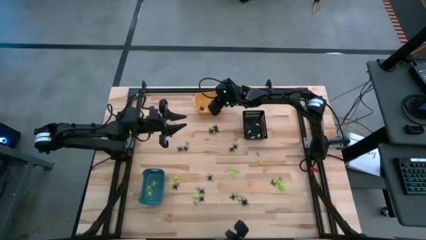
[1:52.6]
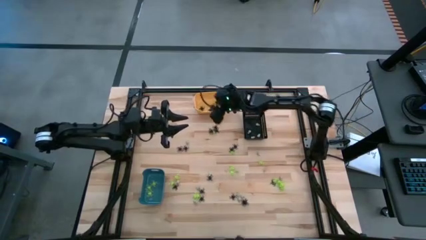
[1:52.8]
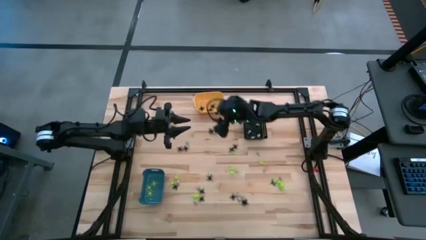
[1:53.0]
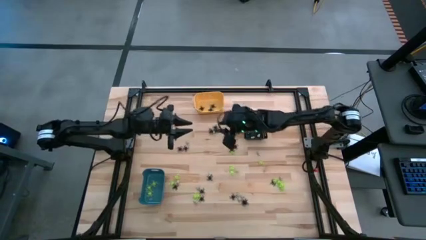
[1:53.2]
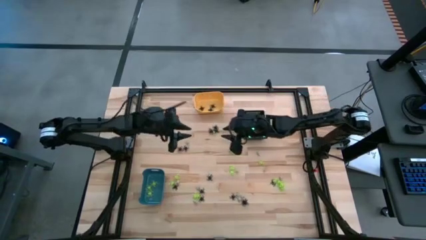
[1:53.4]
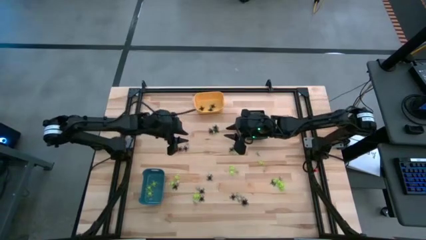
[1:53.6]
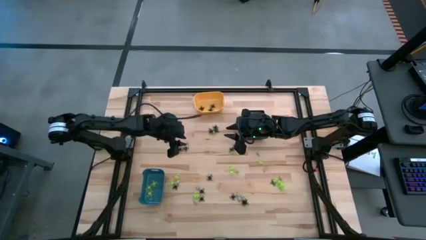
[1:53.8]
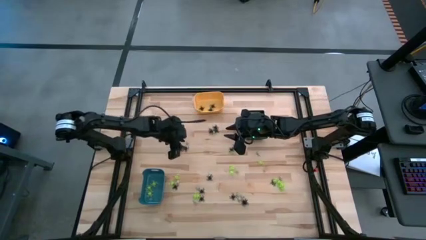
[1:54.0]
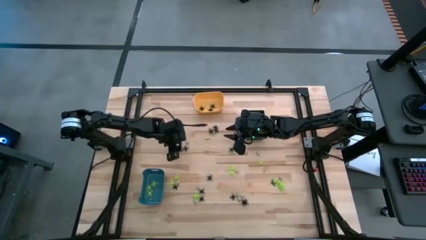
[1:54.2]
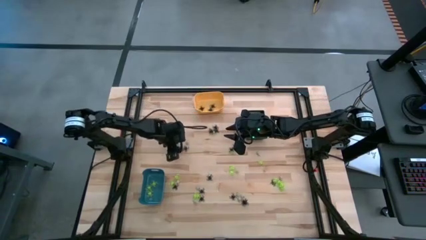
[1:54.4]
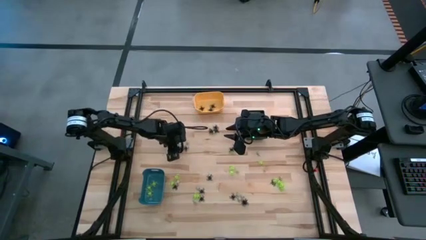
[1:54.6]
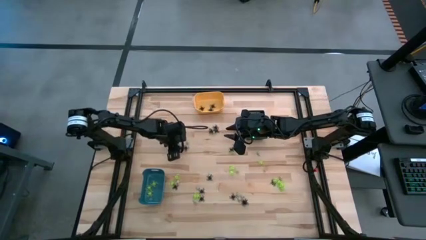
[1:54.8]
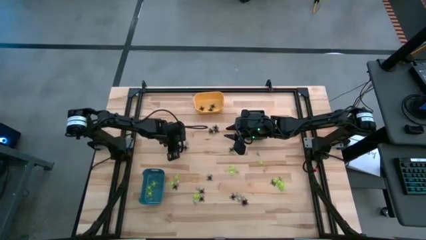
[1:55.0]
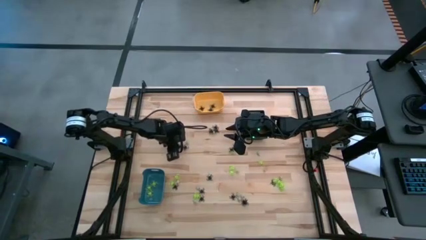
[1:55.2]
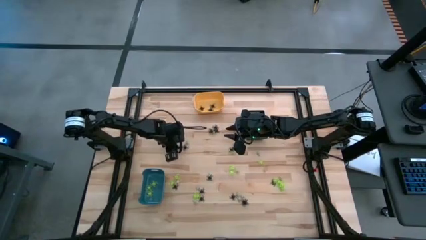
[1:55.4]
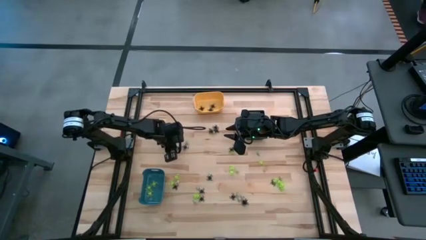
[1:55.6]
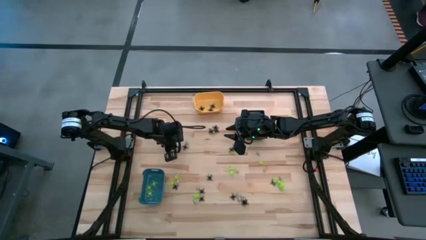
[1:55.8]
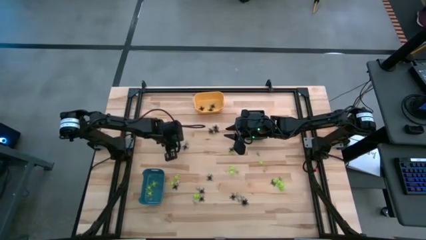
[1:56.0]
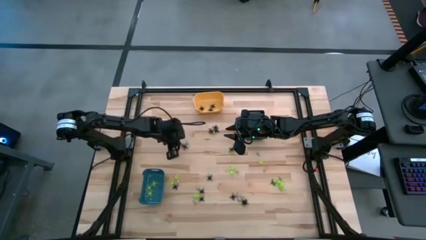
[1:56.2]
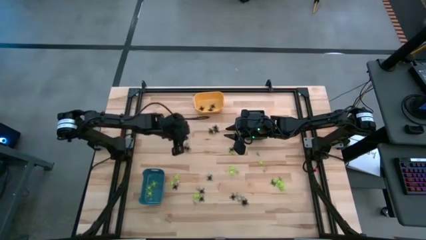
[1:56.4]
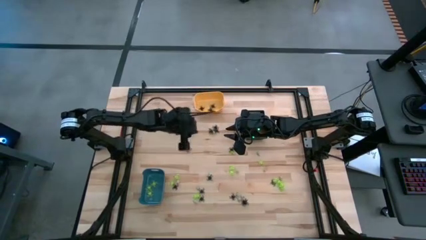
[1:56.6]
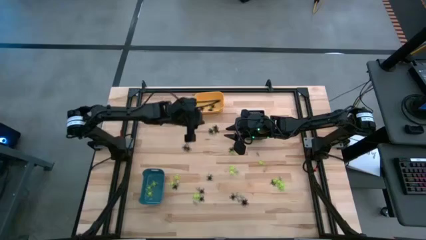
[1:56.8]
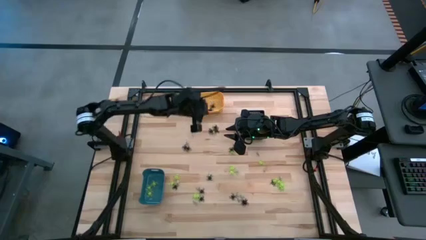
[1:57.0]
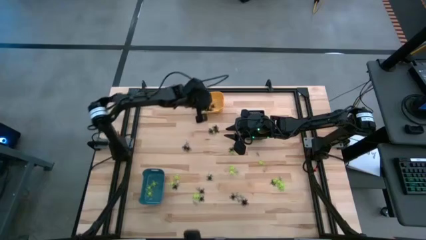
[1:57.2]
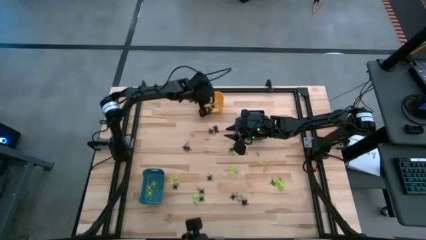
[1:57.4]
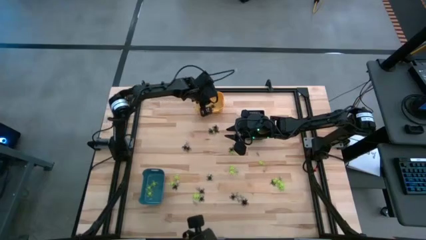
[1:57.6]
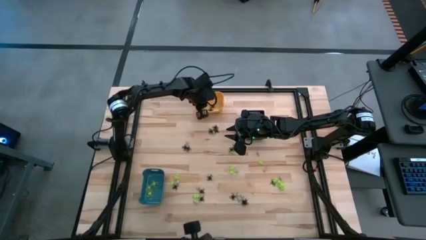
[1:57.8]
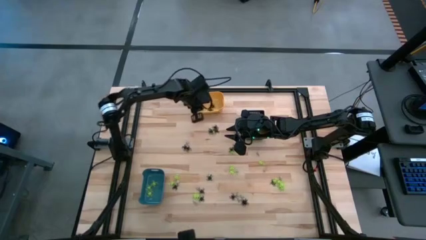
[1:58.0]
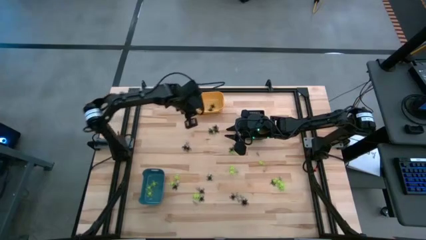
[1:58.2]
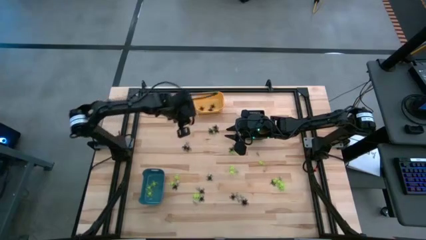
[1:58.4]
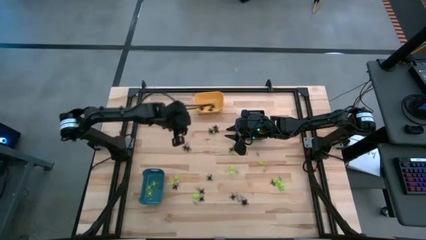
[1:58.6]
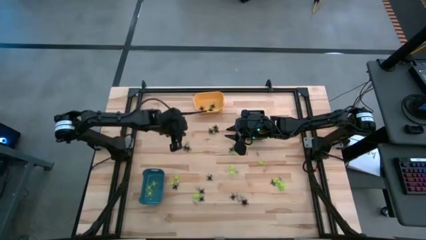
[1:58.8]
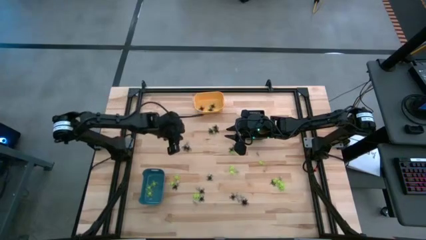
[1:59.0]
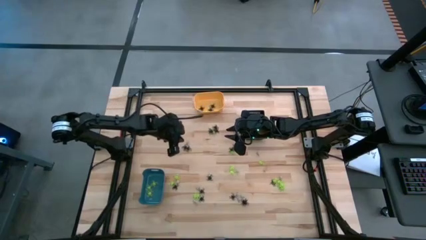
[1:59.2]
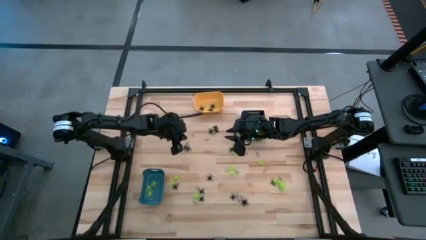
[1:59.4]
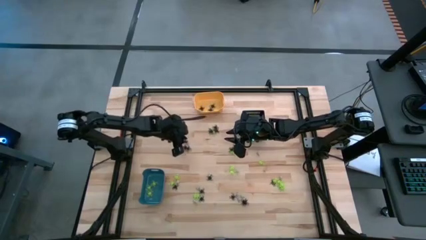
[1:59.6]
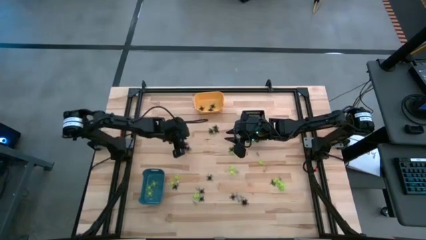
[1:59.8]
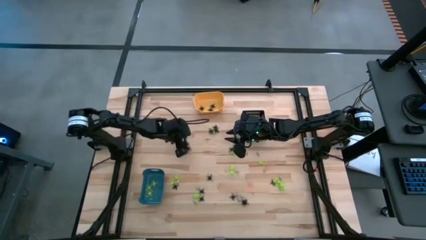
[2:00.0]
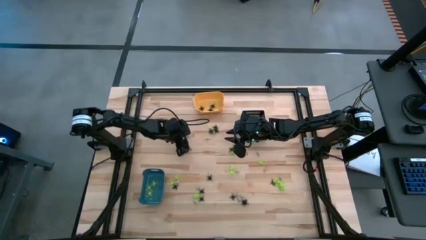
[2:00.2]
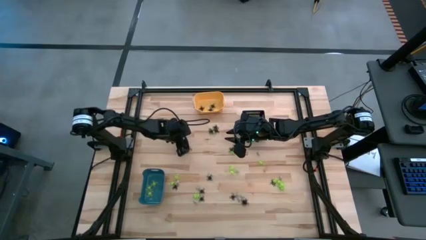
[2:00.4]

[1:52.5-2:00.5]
Task: Sort Halloween decoration
Put the white skull toy into the black bin

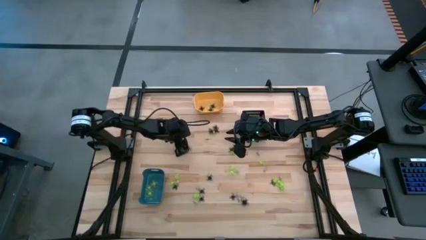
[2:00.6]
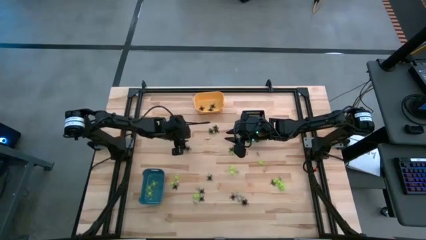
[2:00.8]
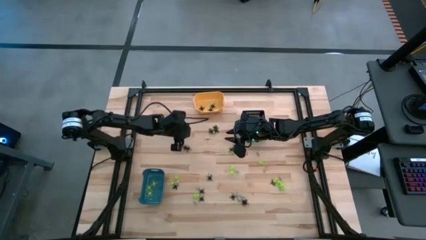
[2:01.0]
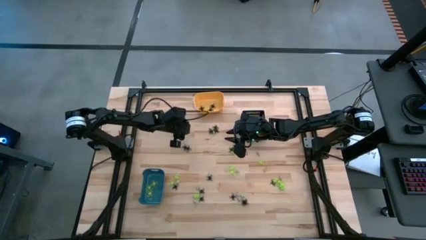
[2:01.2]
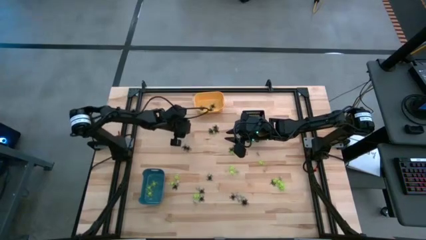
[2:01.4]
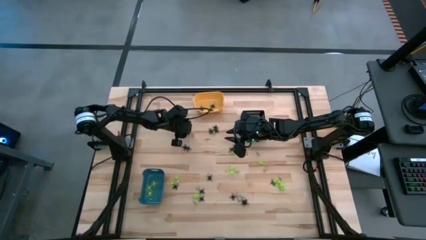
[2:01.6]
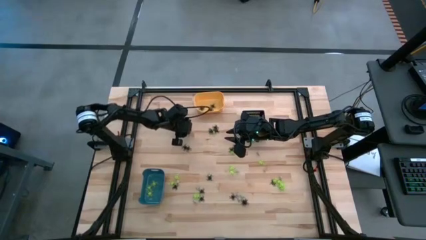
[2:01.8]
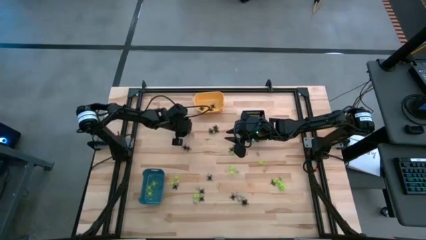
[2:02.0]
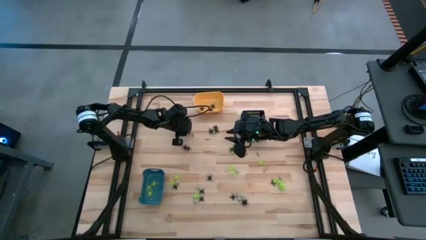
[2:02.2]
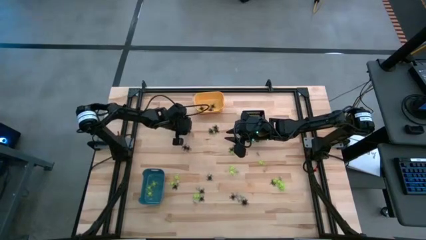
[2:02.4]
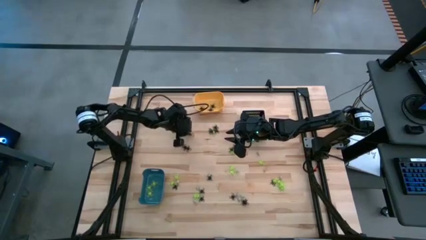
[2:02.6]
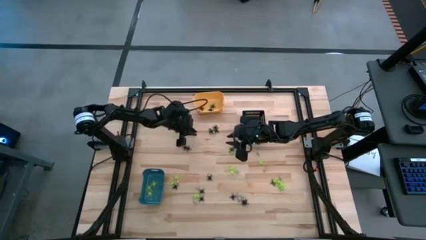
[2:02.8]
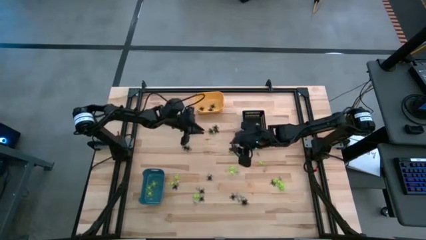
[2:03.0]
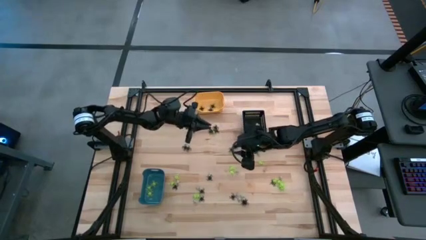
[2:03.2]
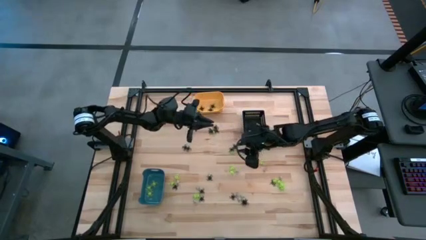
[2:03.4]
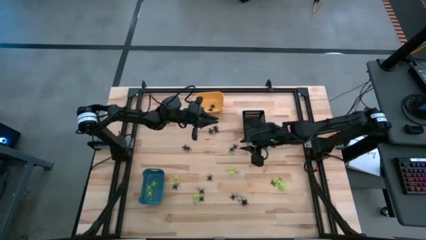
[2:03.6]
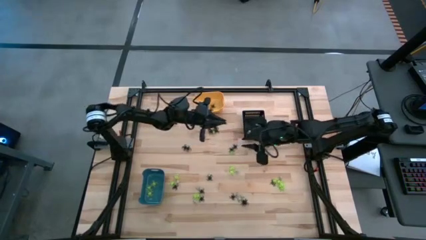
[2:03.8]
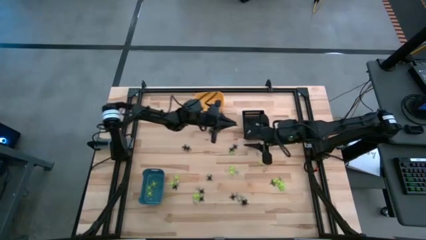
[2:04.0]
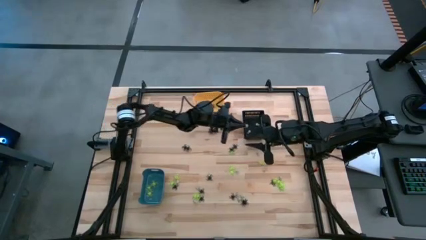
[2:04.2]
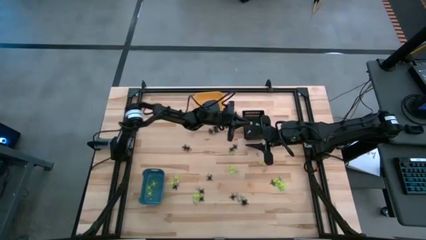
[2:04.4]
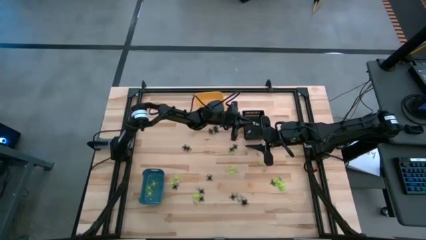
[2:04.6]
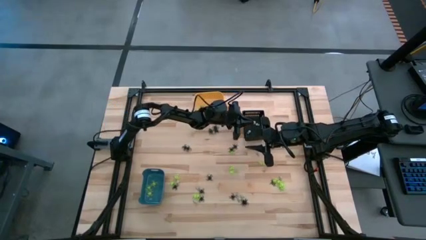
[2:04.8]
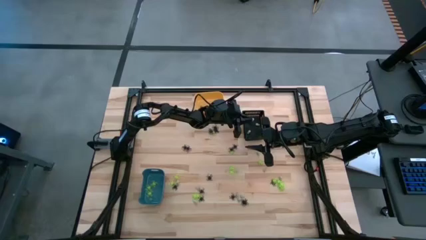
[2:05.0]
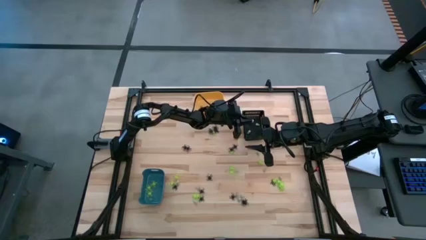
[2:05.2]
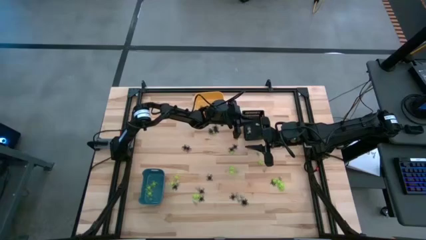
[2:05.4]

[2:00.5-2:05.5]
Put the white skull toy into the black bin

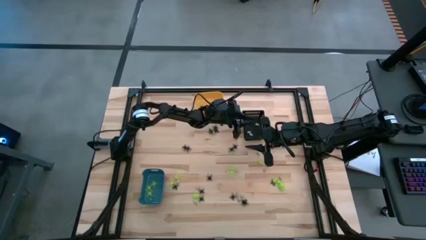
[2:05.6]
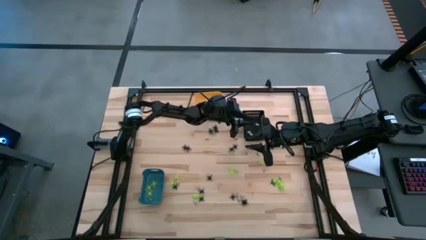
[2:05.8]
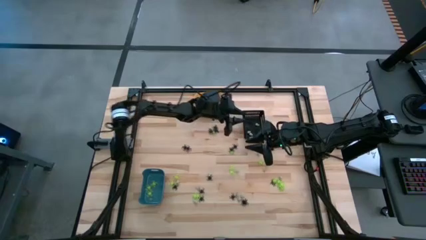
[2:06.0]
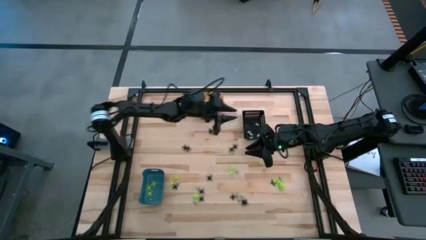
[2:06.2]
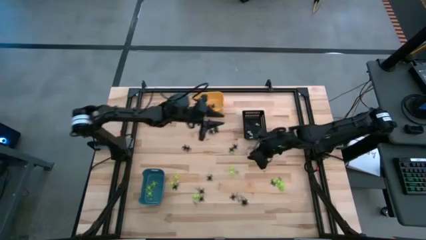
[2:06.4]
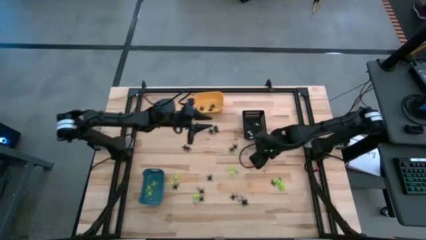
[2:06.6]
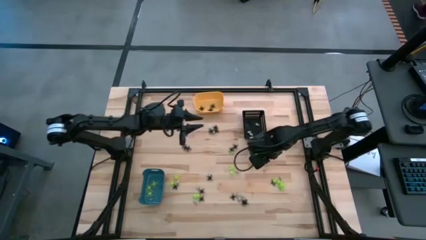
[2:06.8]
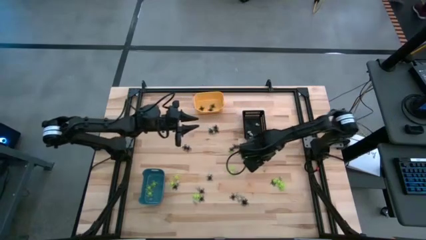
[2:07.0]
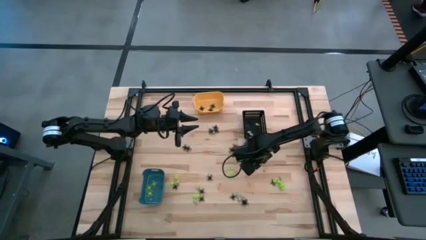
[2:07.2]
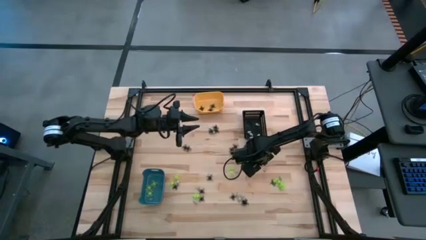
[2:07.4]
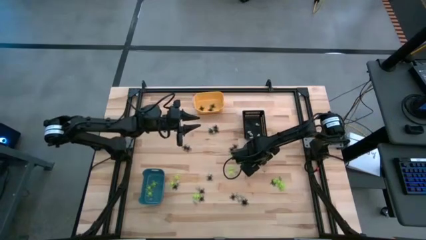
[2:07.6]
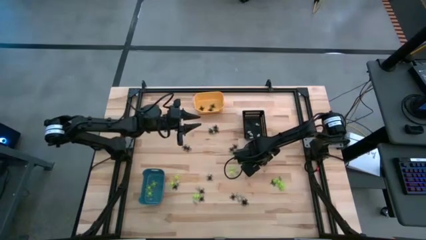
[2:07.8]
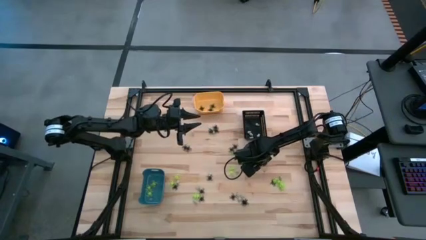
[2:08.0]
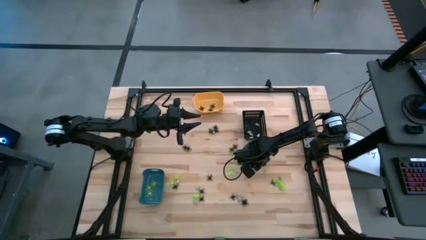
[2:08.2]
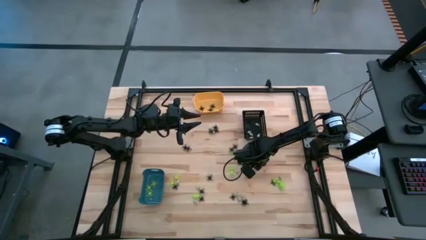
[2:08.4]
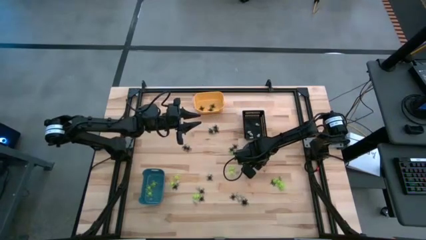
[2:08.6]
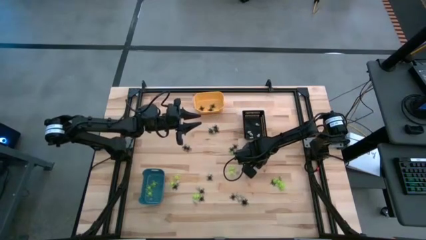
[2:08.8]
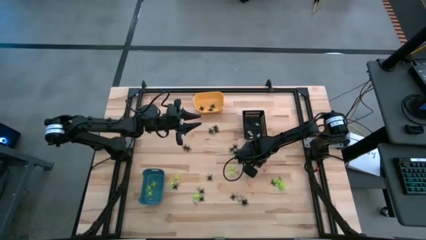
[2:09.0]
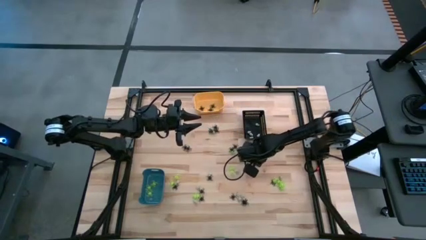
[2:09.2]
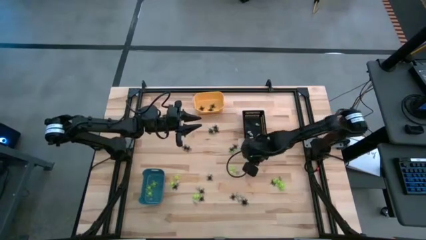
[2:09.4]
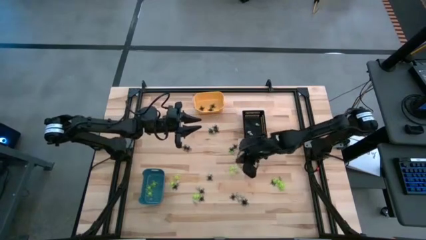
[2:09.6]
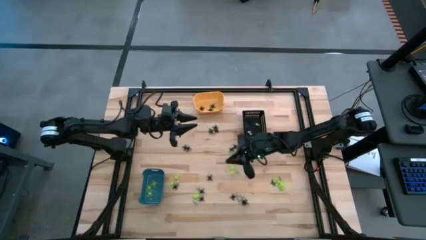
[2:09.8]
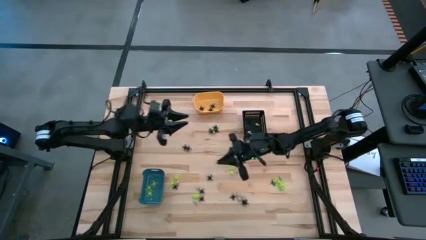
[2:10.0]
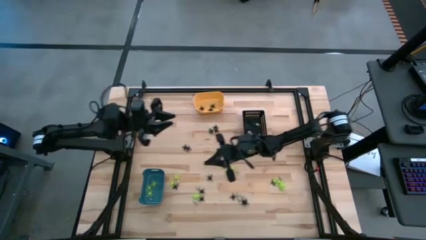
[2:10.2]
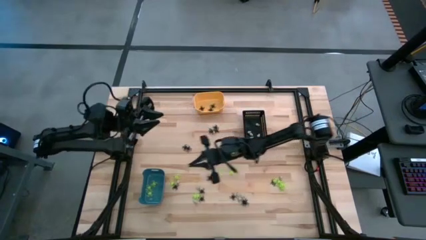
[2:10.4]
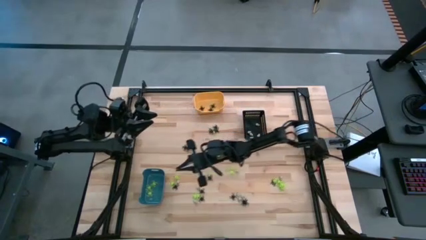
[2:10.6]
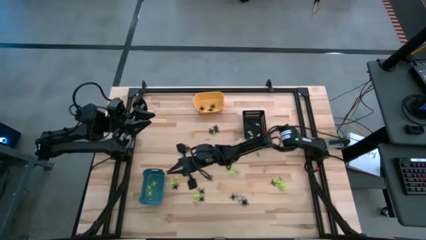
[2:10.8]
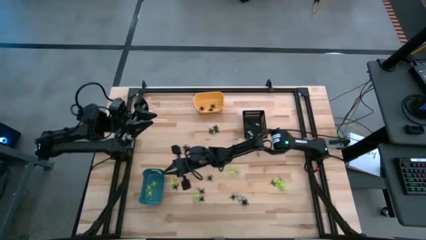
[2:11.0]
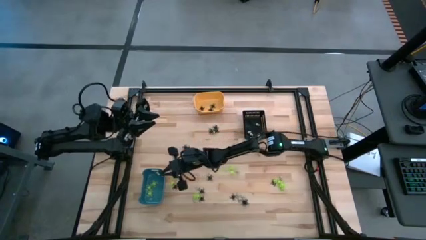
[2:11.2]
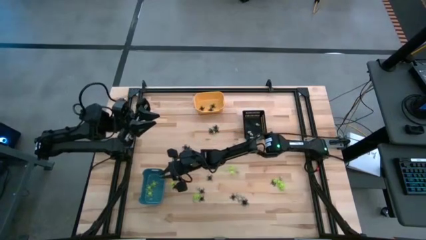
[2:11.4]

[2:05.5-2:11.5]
Put the green spider toy into the blue bin
